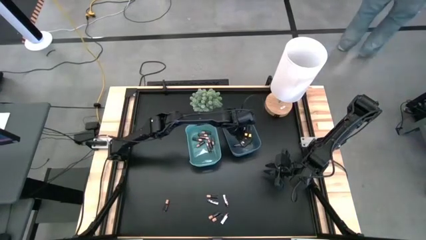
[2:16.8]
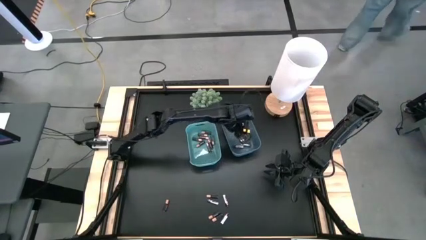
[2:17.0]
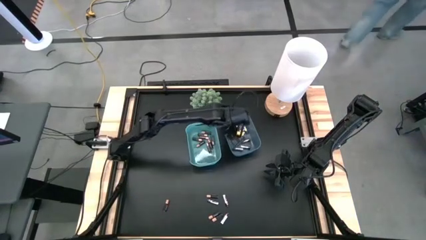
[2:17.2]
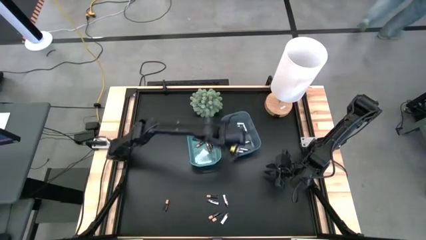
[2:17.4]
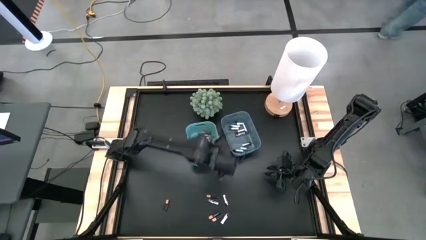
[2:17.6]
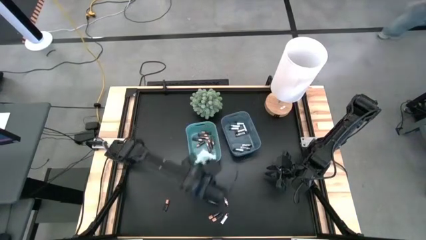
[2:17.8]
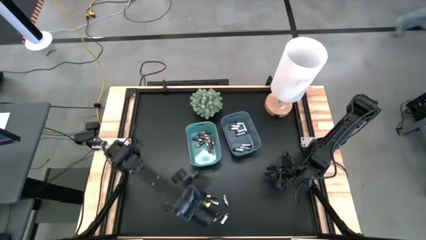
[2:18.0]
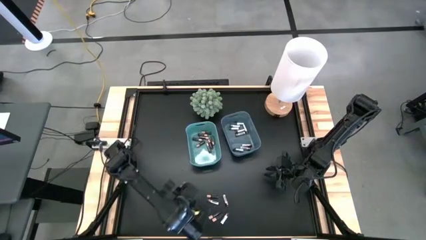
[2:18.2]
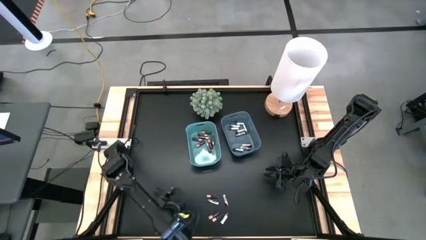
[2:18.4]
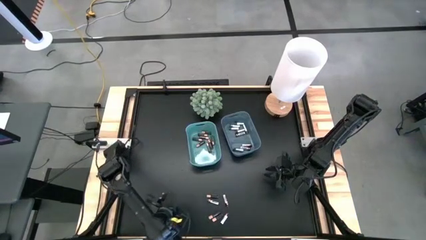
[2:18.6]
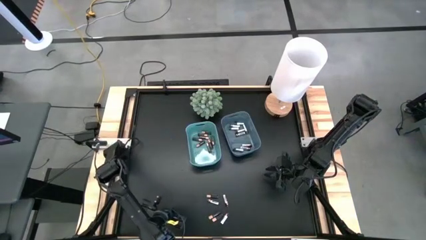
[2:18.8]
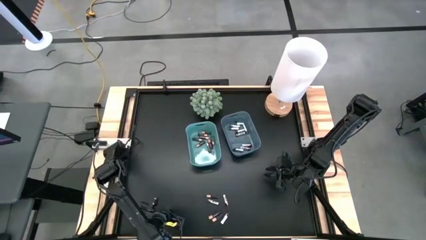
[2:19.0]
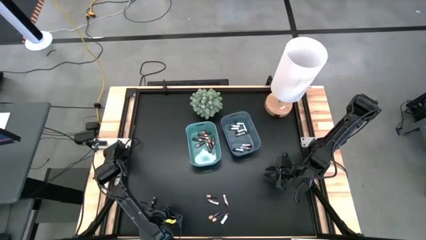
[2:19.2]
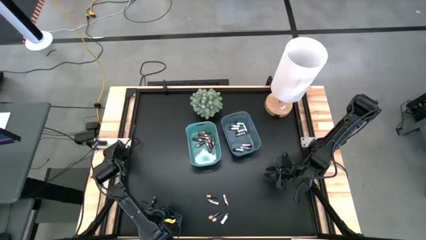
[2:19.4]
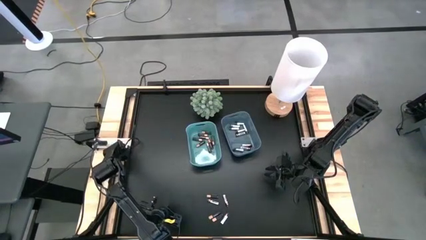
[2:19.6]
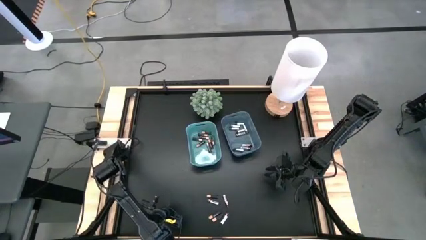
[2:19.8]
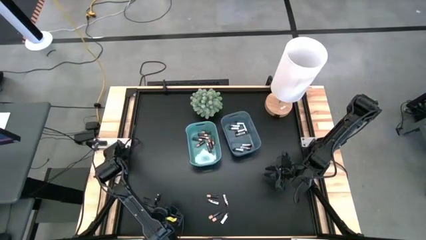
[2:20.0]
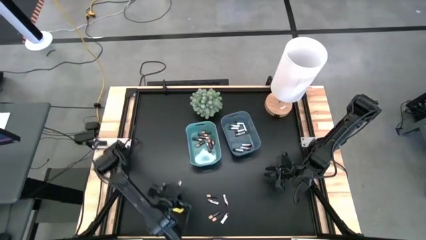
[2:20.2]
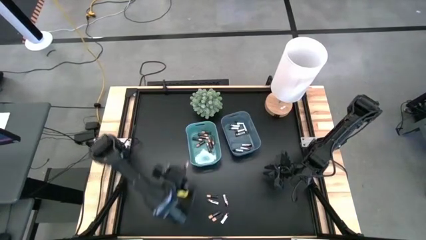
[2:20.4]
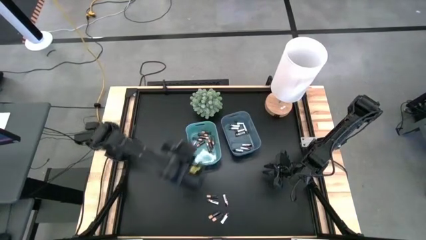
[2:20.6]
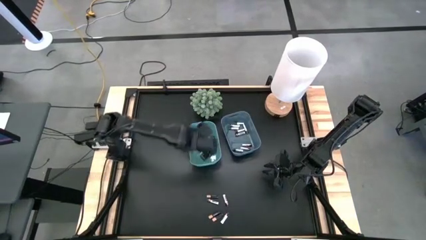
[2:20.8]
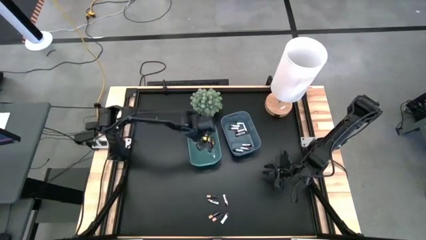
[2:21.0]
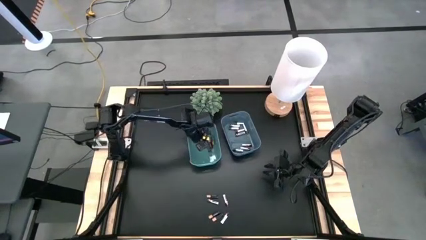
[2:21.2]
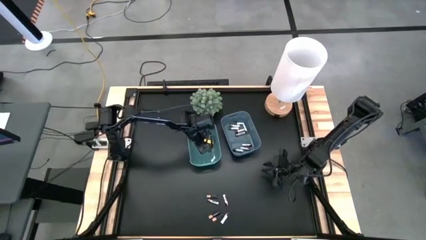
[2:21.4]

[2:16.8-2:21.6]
Task: Sort batteries
Put the black battery into the green bin

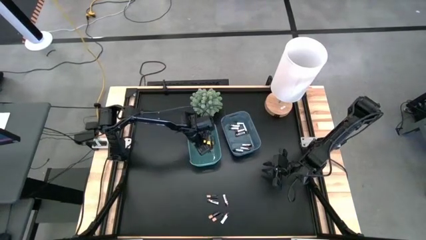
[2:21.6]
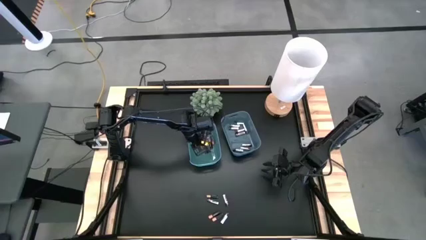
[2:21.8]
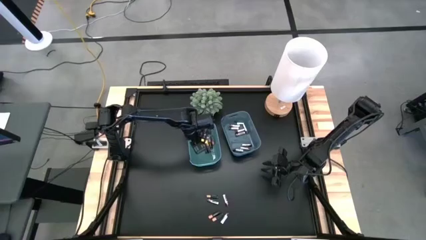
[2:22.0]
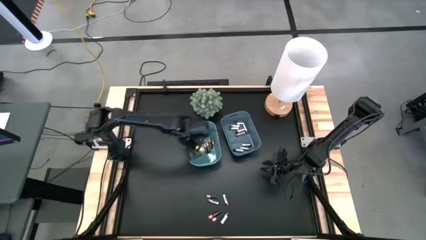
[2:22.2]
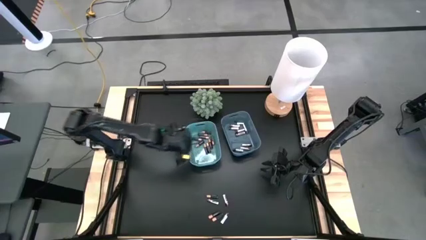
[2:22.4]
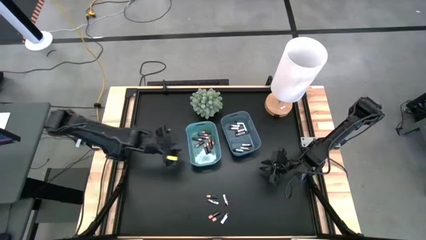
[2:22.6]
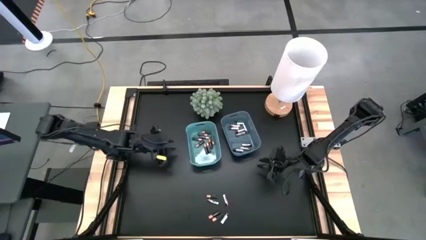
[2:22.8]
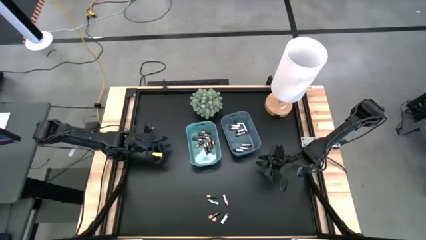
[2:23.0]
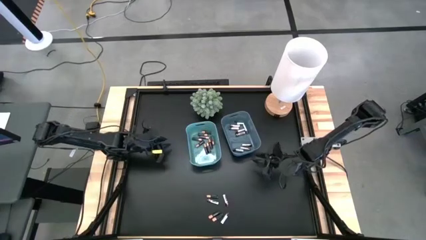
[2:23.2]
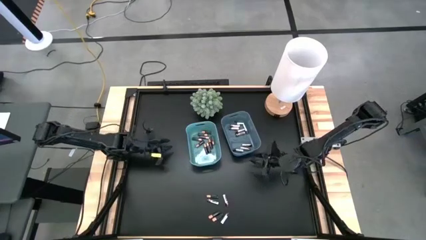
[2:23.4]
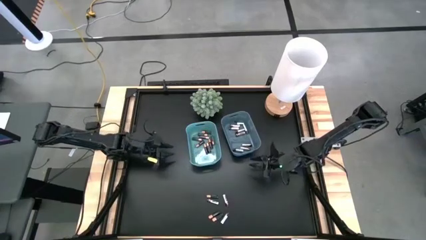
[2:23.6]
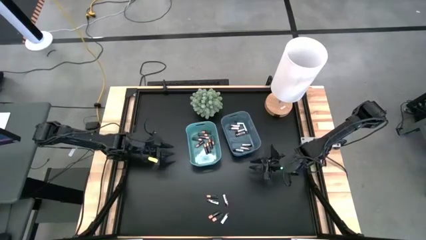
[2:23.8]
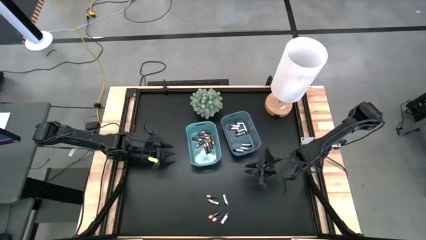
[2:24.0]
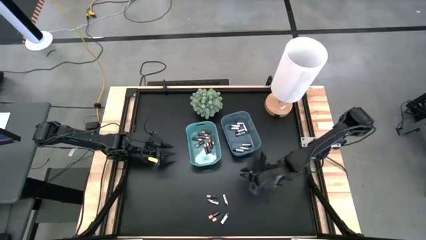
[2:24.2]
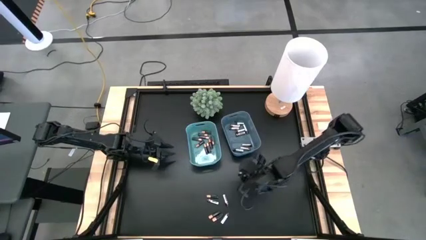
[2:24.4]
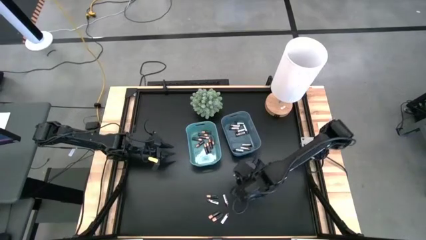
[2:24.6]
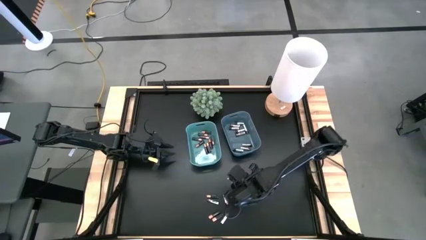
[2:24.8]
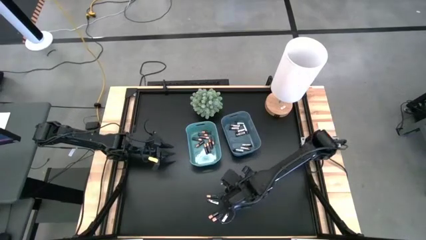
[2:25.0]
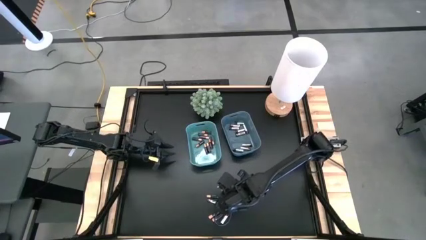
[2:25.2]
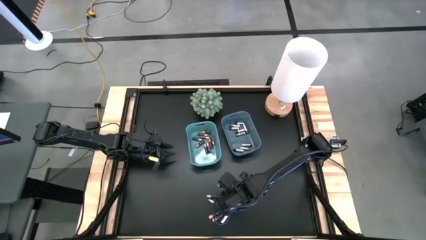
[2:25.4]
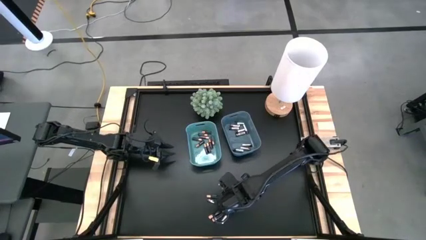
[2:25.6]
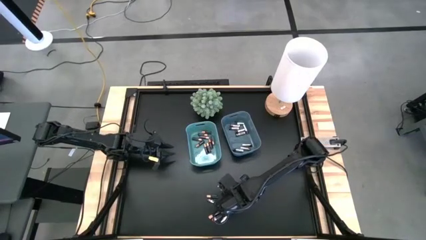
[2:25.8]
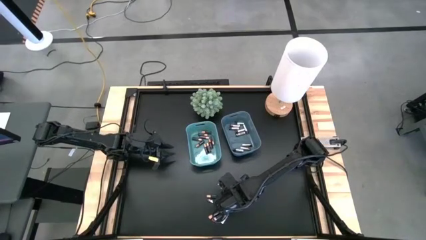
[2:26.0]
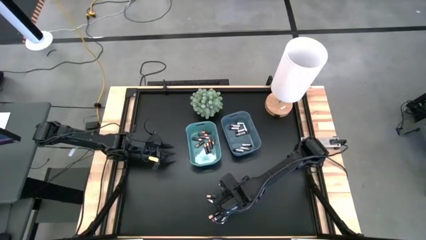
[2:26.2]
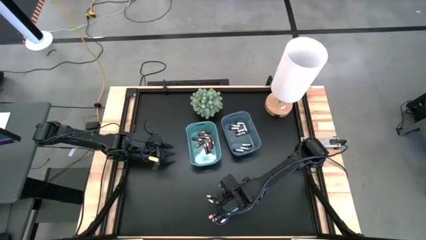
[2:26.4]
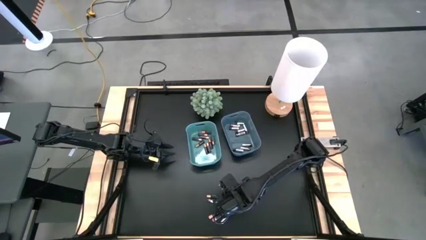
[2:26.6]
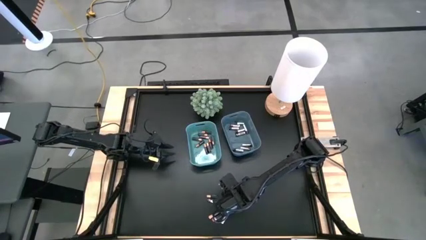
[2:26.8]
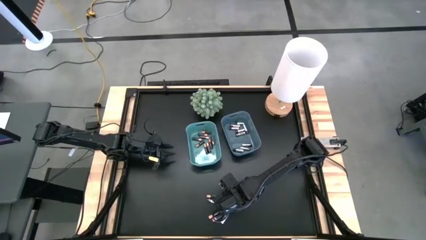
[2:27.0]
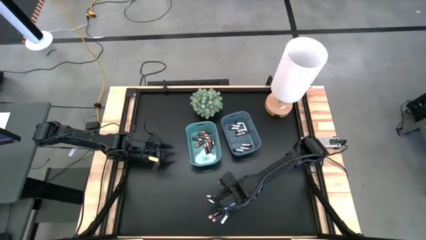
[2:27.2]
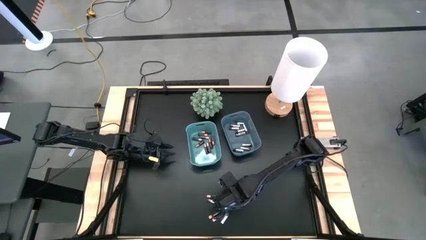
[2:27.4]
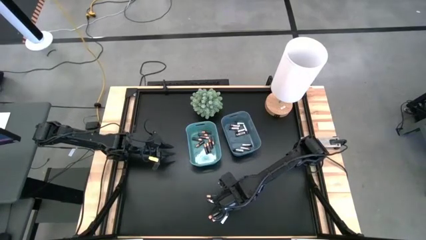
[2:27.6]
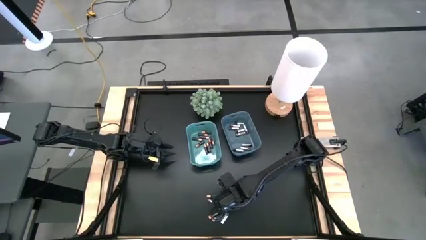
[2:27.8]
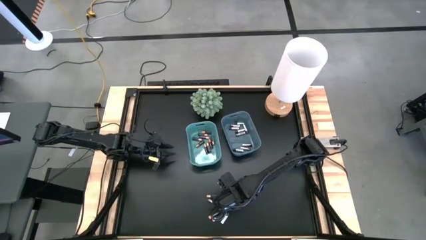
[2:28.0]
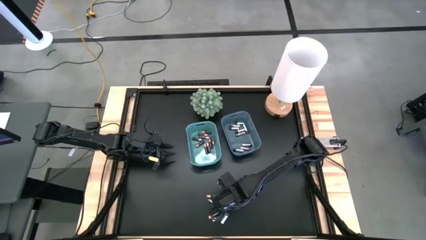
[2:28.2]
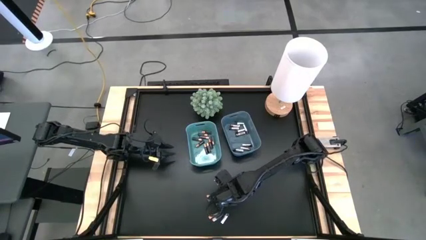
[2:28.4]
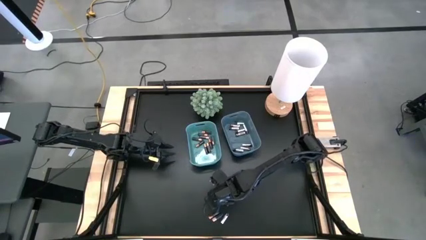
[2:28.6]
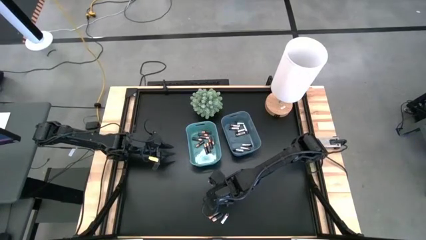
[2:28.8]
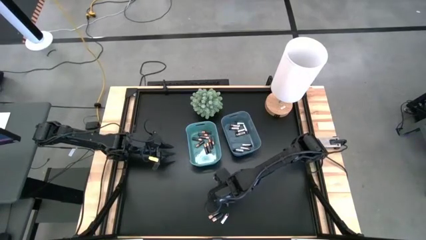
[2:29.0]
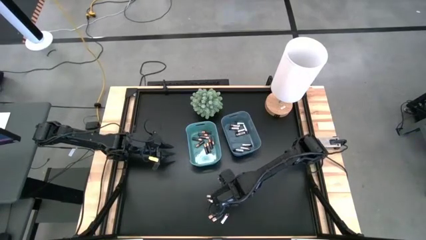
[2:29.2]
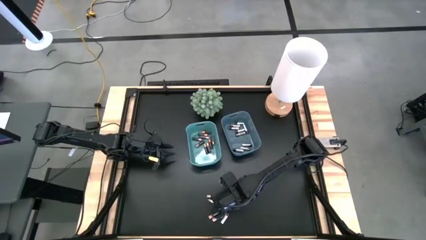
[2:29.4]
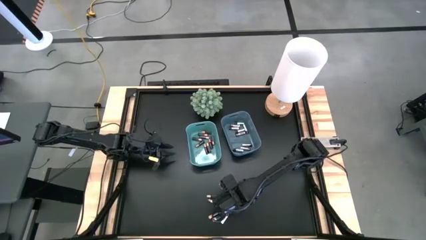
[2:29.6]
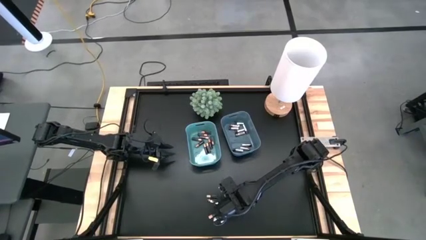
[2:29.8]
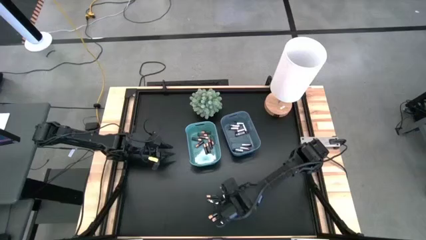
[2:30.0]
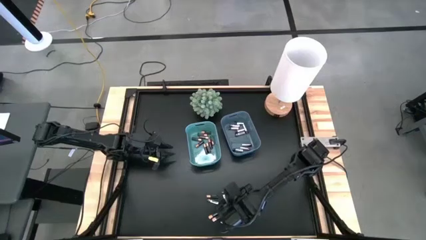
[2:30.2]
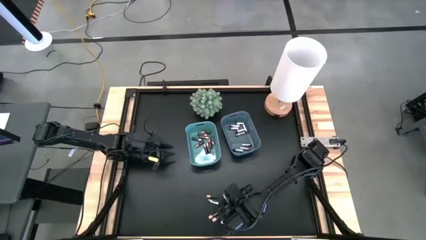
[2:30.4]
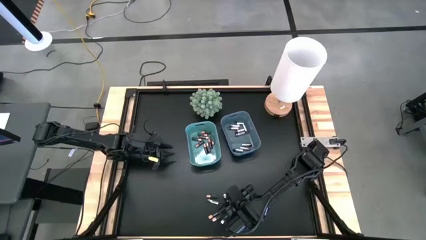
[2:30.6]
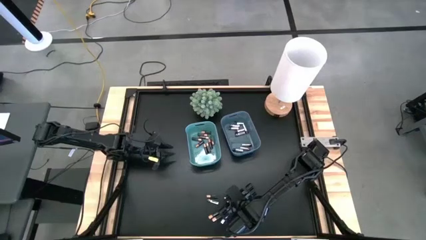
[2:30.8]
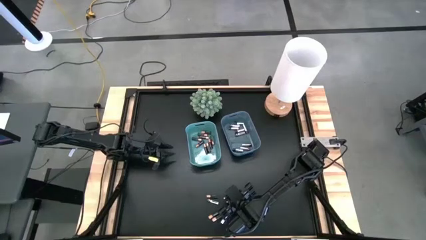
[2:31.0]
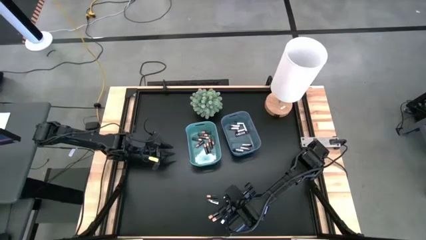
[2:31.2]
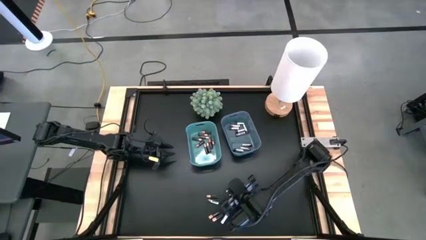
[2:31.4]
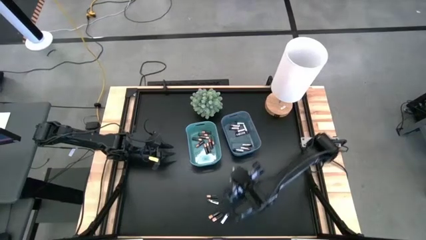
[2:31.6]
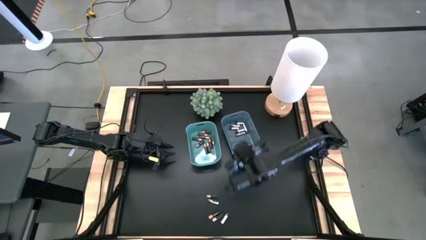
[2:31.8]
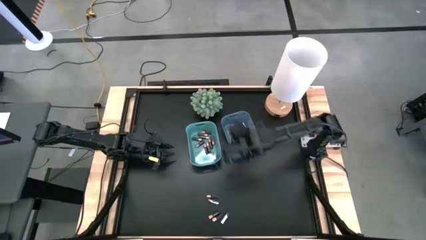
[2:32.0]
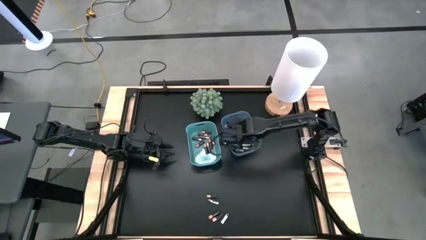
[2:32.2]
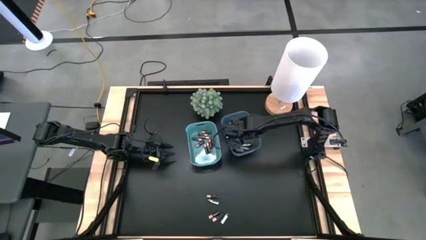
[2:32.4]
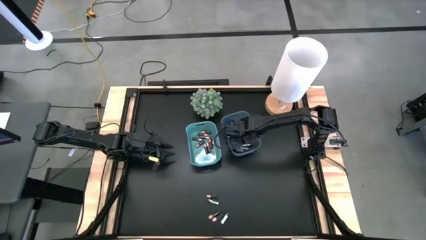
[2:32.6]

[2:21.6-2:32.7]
Put the white battery into the blue bin

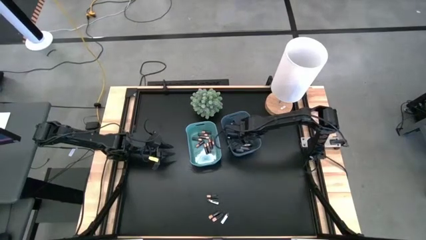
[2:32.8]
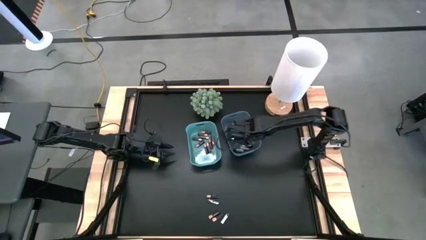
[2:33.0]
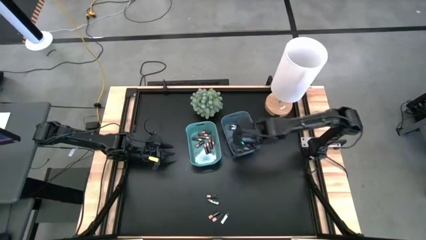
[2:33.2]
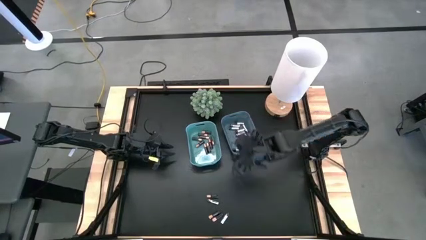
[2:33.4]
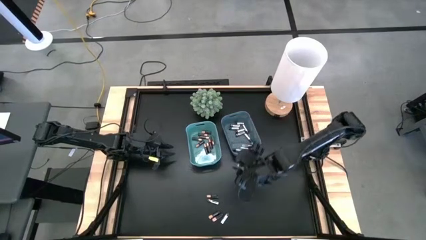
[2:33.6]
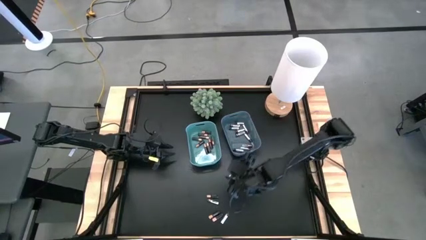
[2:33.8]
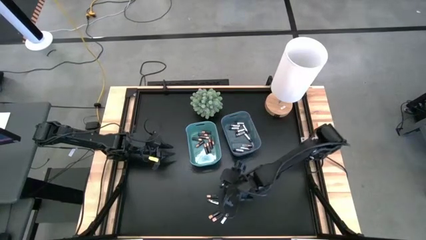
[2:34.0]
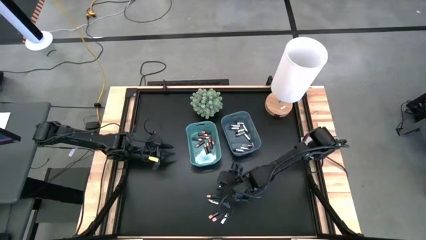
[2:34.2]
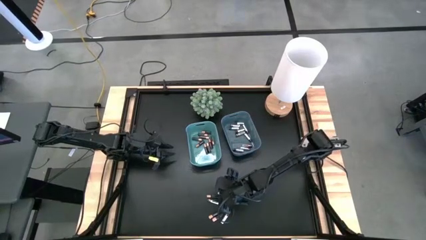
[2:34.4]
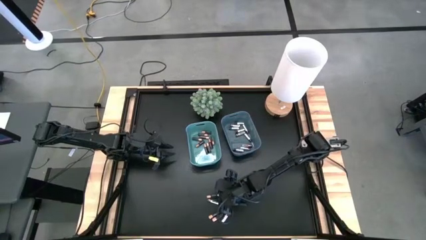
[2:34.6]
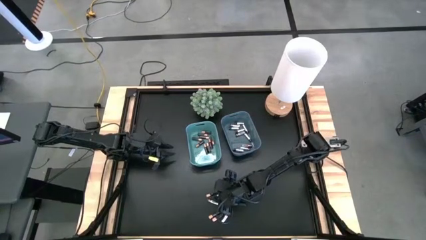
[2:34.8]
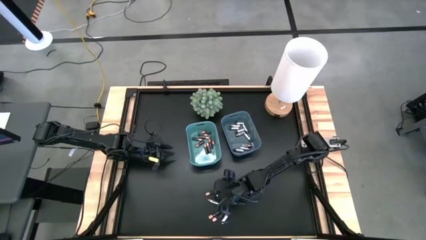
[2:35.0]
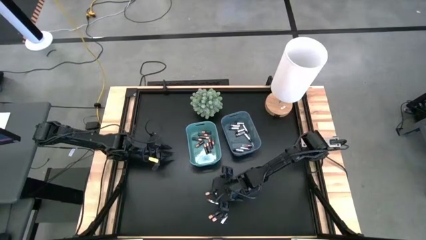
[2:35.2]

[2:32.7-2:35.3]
Put the black battery into the green bin
